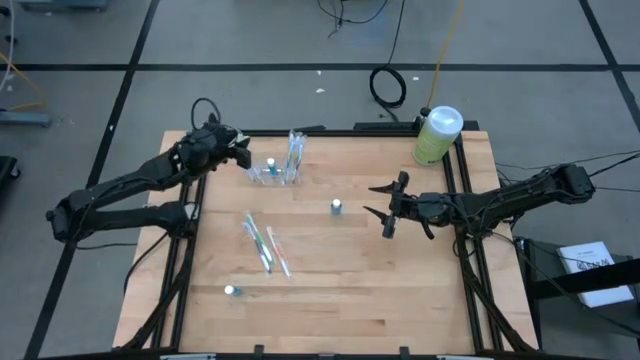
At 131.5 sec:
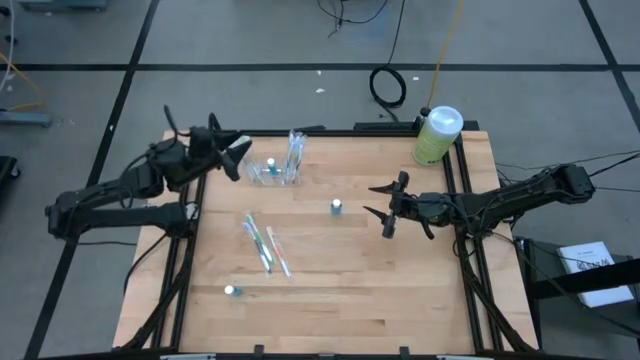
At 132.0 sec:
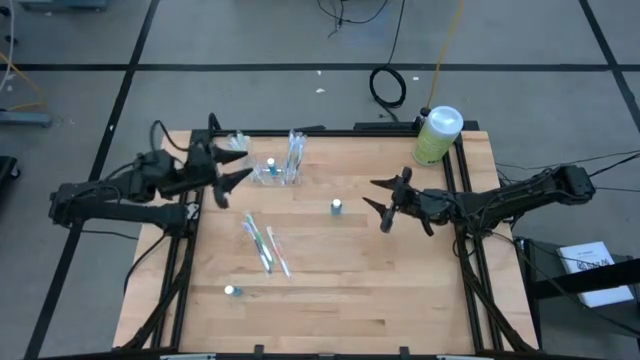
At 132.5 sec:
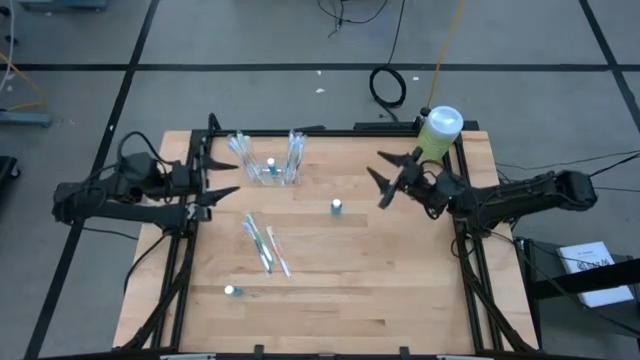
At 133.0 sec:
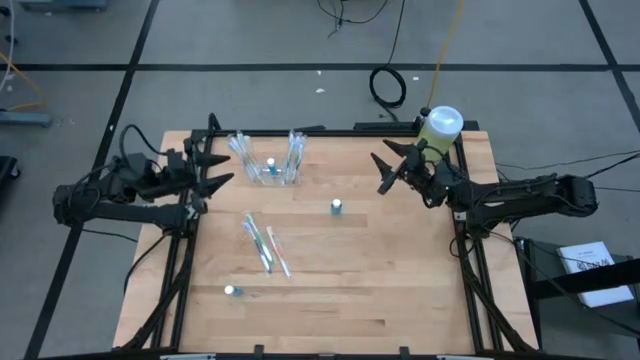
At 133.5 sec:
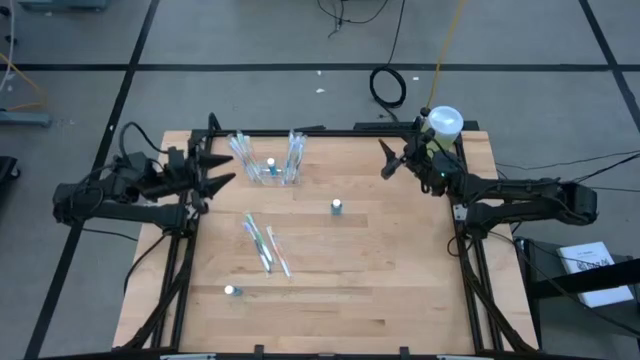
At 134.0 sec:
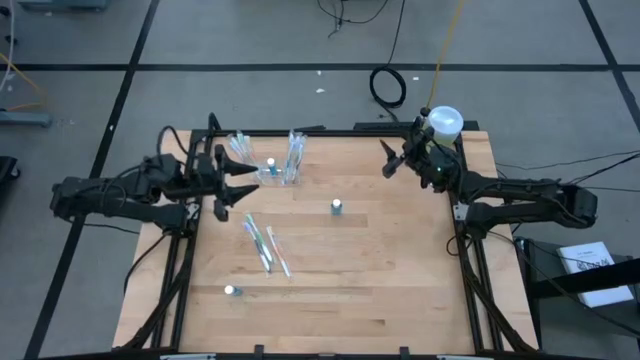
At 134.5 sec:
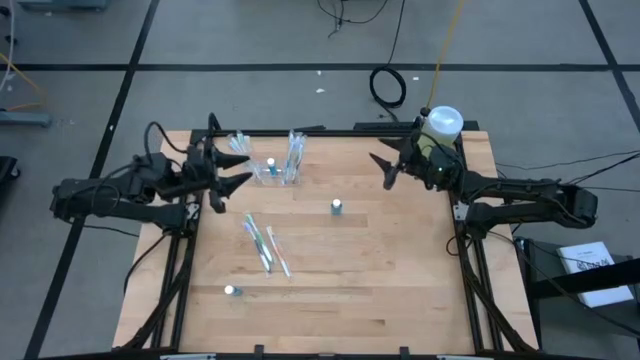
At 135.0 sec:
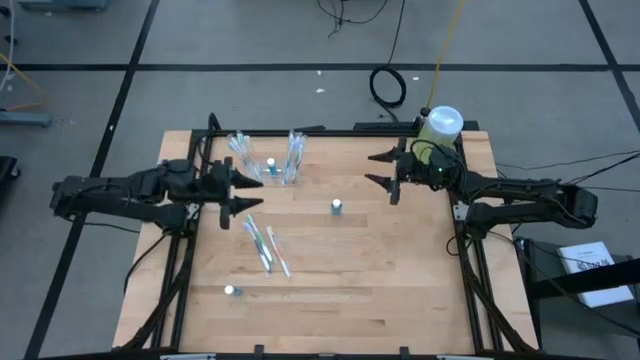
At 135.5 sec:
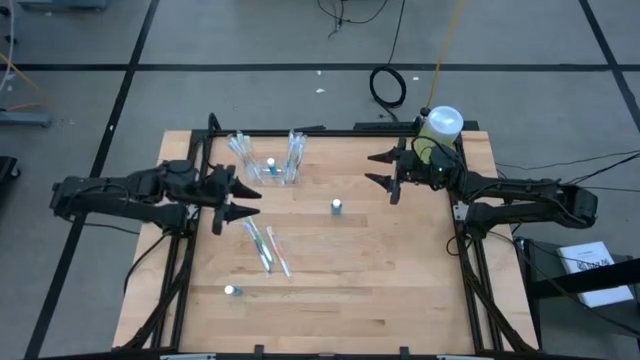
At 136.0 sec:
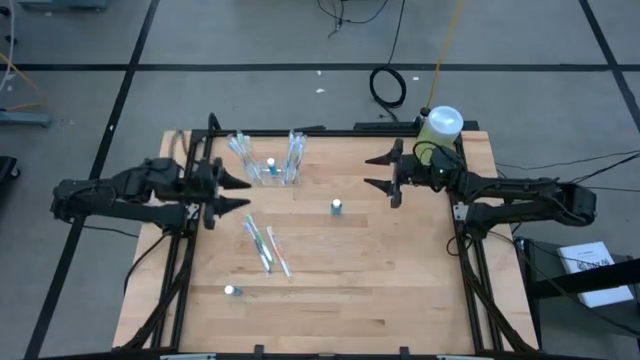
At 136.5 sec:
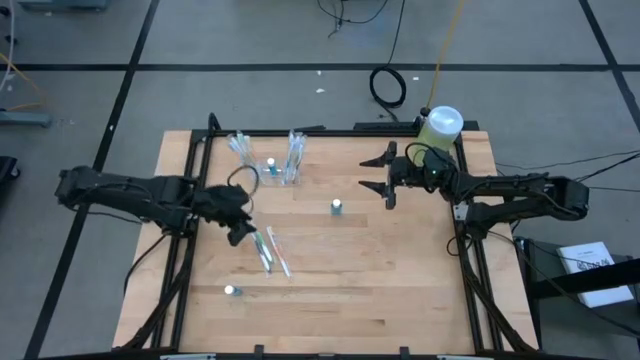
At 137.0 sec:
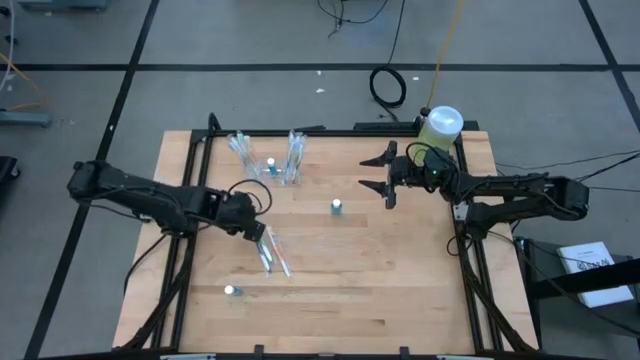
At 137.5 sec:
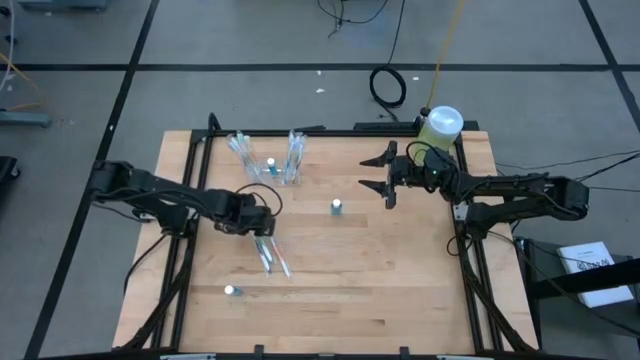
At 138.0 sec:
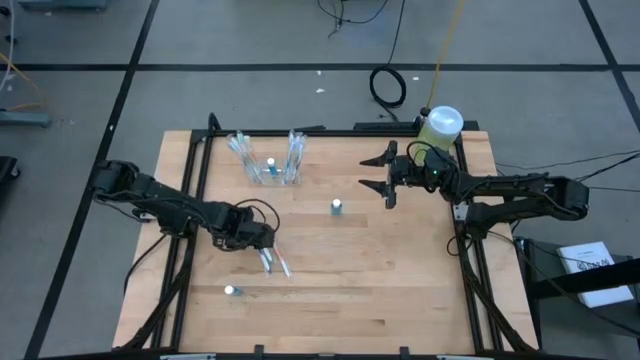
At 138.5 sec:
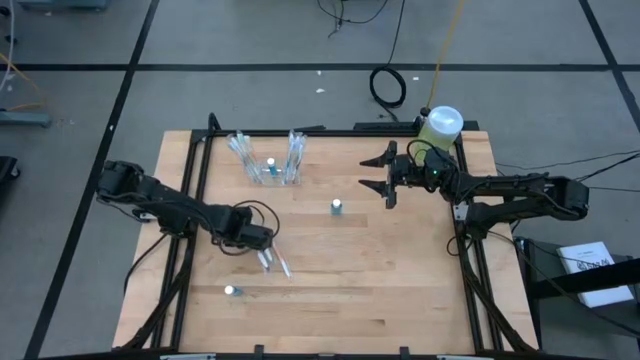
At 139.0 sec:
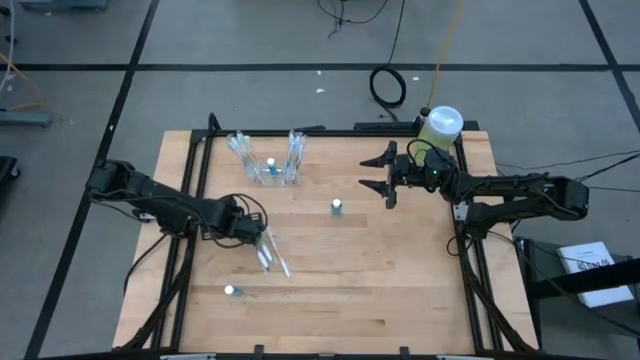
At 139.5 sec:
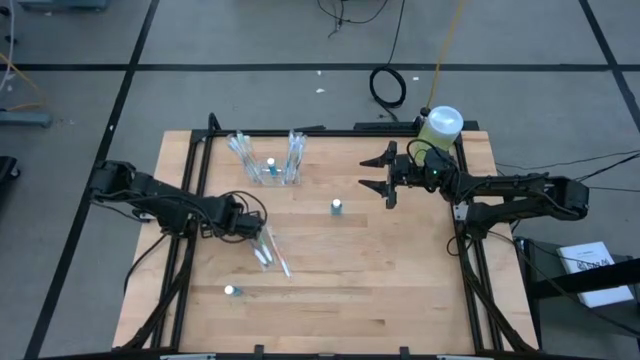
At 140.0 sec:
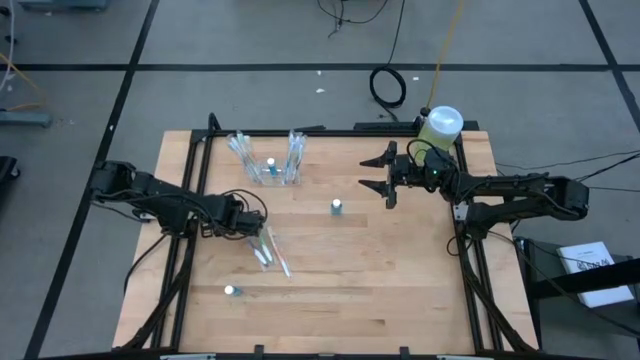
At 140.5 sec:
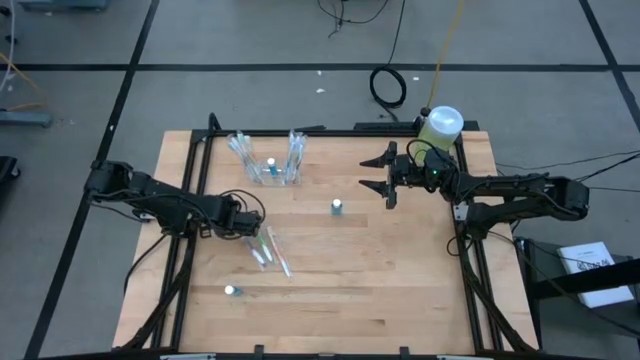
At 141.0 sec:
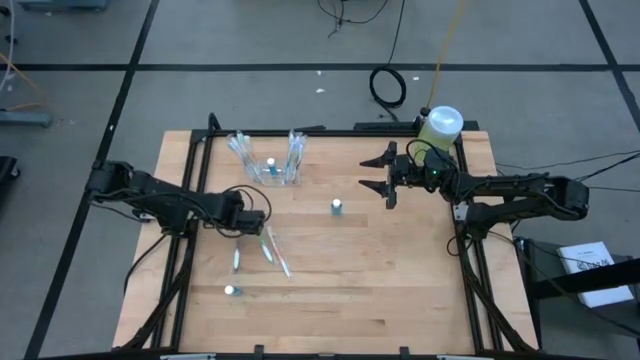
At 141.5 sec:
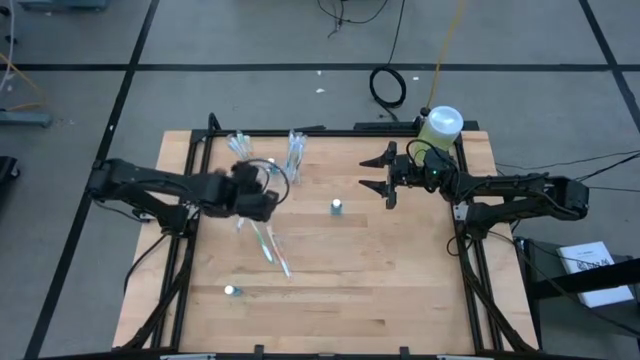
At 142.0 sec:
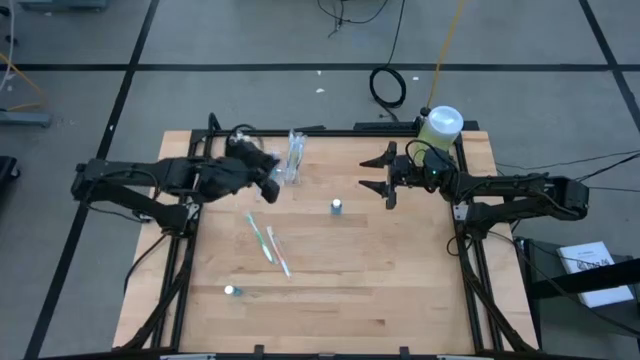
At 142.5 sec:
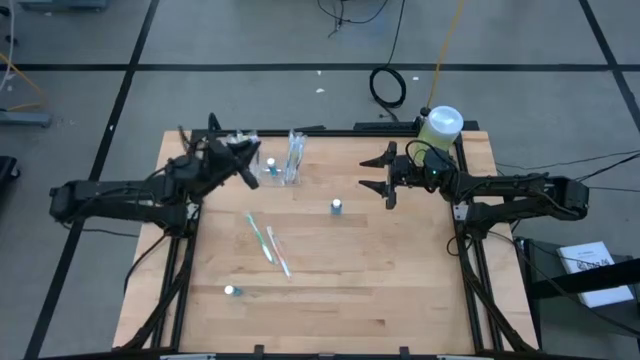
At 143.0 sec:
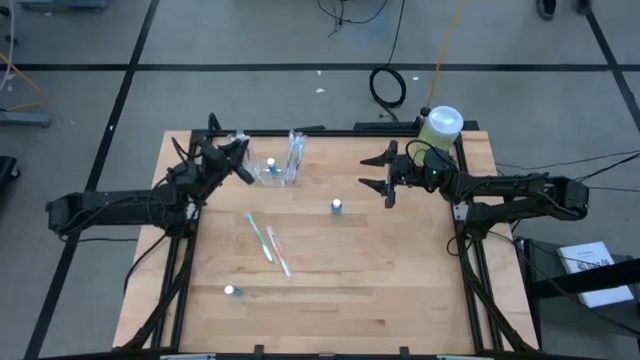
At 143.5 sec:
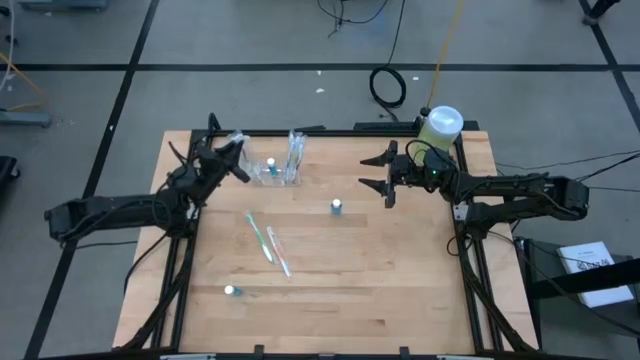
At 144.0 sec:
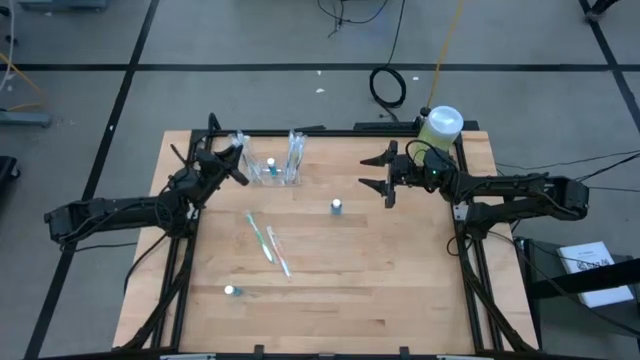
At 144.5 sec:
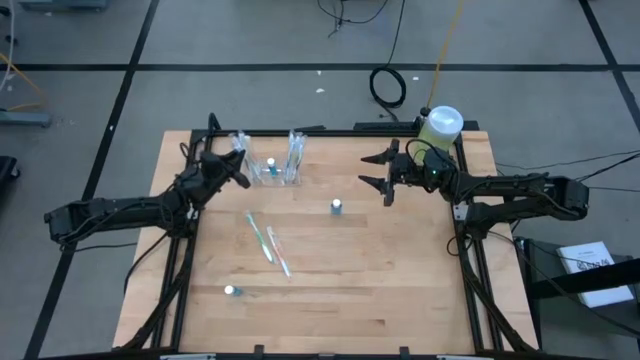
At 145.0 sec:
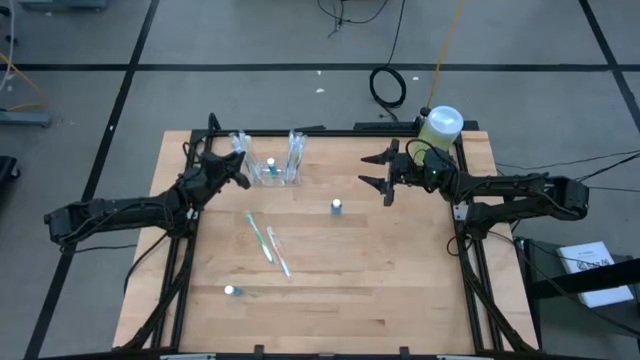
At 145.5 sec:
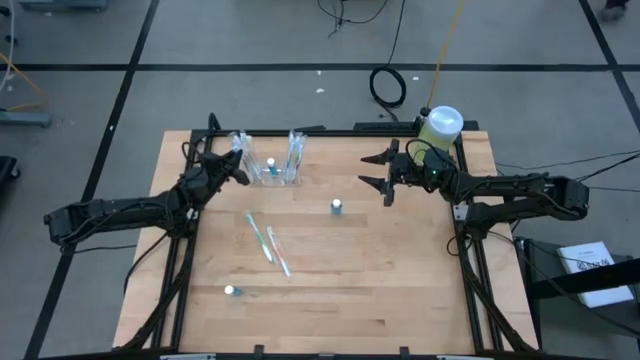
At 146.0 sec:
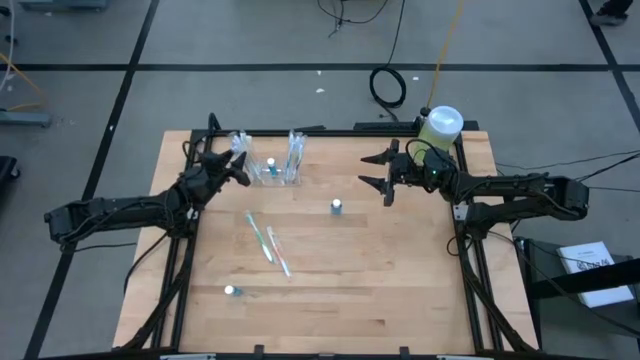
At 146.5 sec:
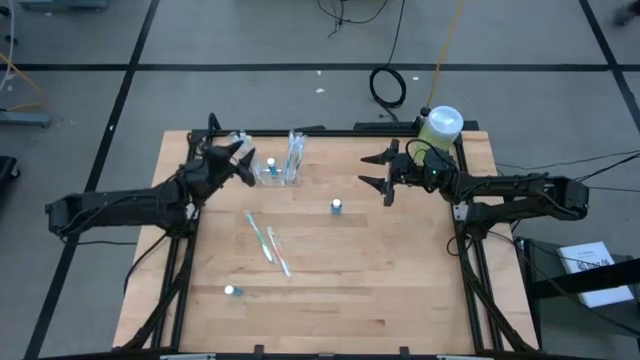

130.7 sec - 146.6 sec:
Task: Pick & Place toothbrushing station
Put the purple toothbrush into the transparent organizer

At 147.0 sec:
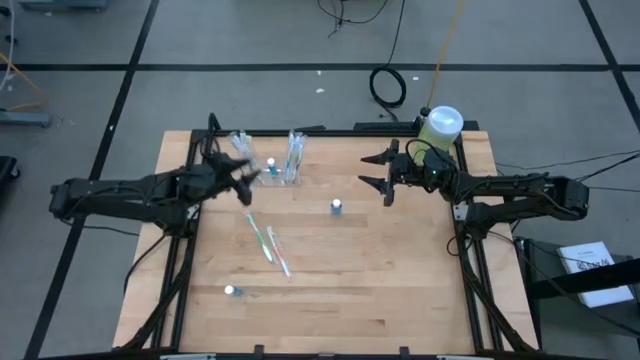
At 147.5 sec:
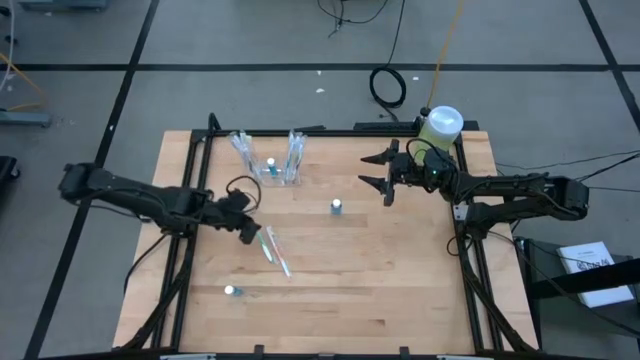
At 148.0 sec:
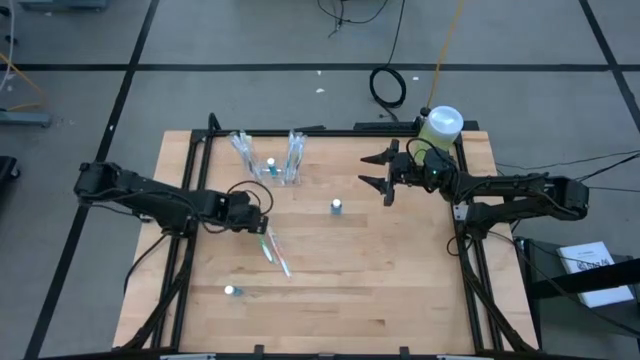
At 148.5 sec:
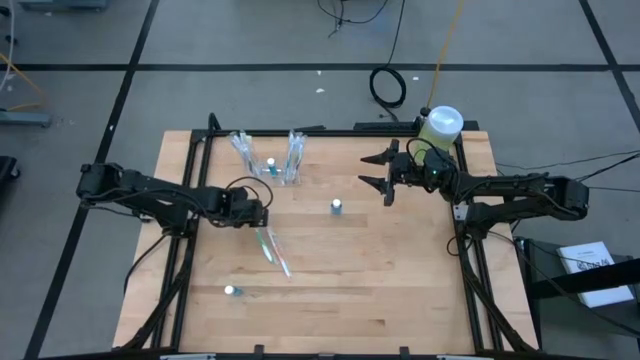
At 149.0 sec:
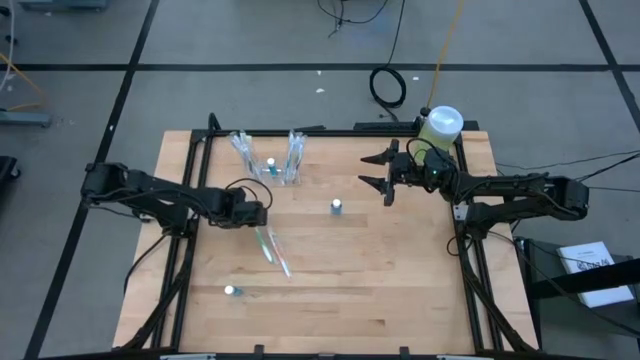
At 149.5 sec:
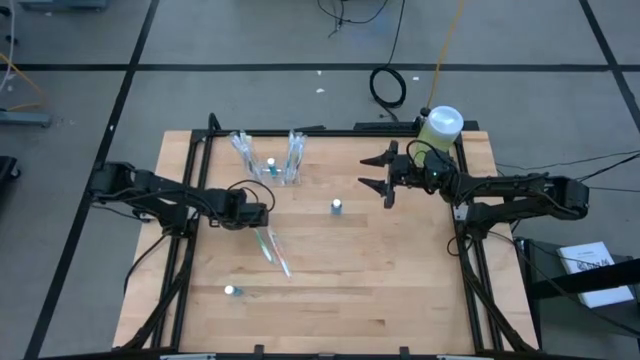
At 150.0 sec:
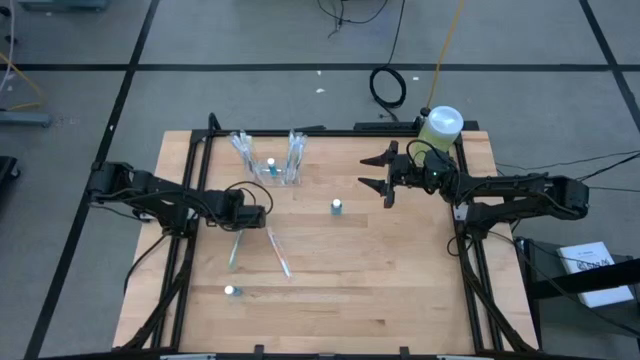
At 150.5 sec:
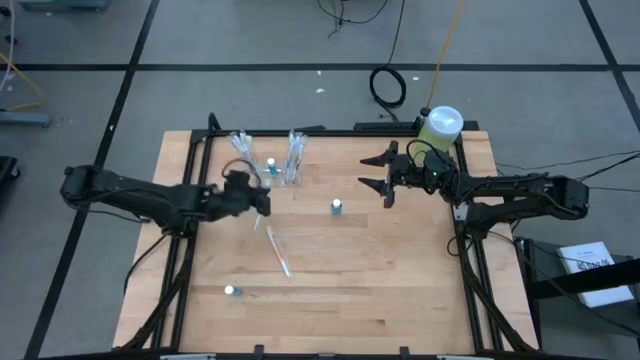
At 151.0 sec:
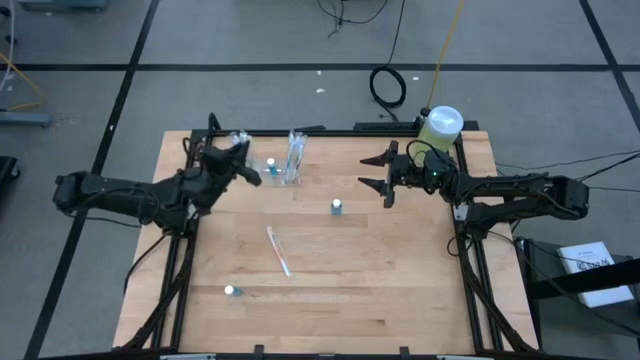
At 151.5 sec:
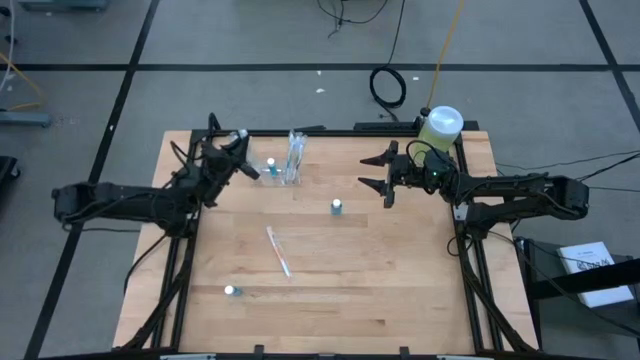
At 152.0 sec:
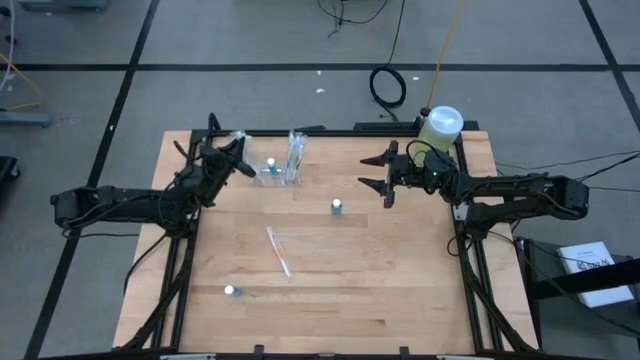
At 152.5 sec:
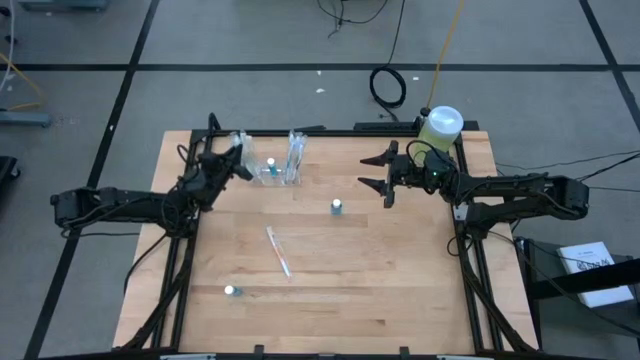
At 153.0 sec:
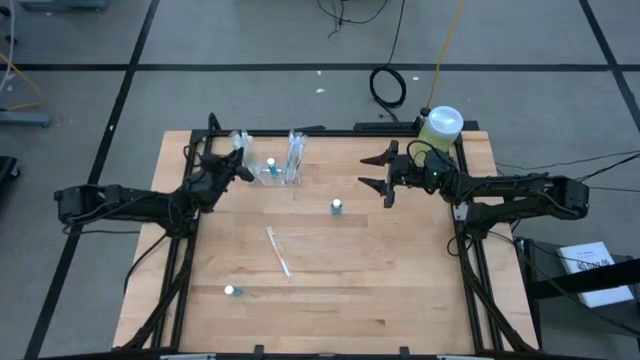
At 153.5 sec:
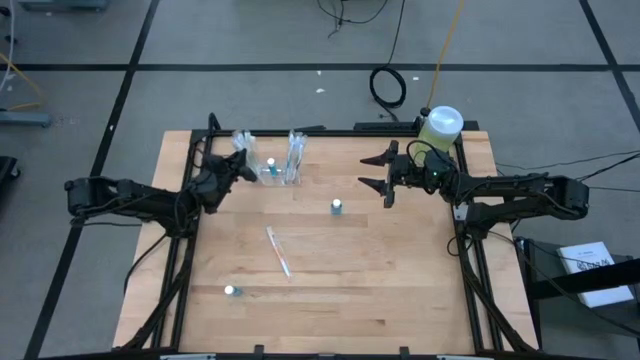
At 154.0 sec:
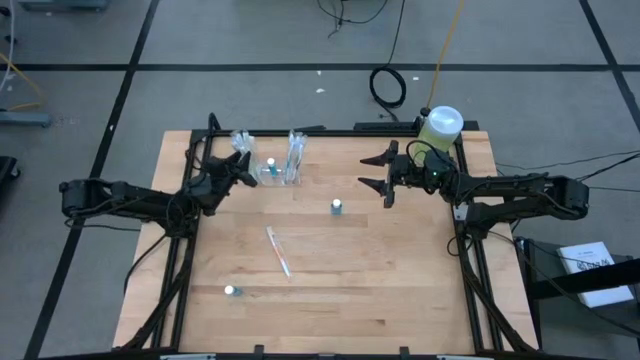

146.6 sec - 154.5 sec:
Put the green toothbrush into the transparent organizer
